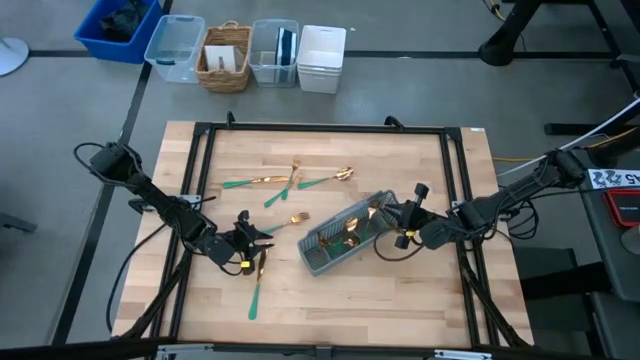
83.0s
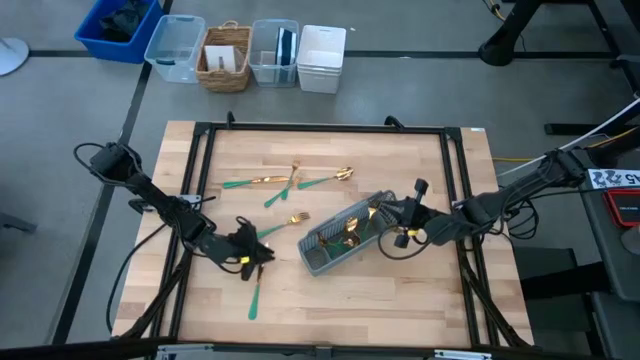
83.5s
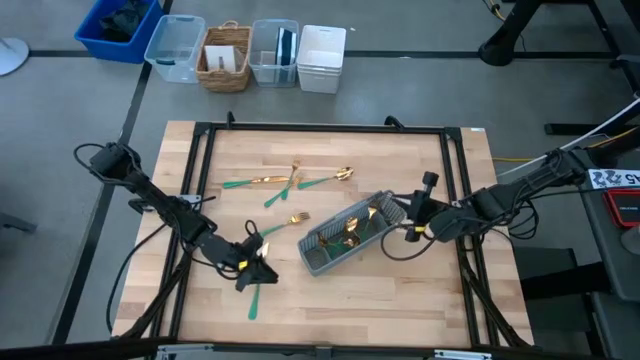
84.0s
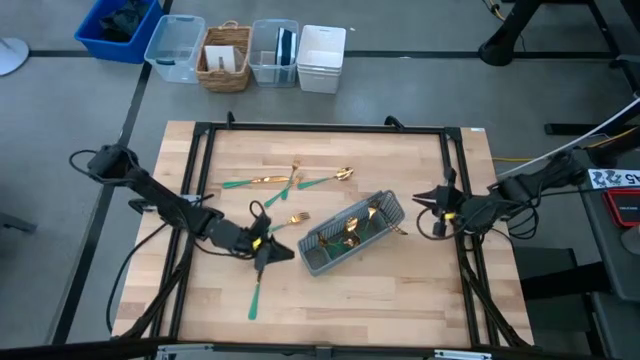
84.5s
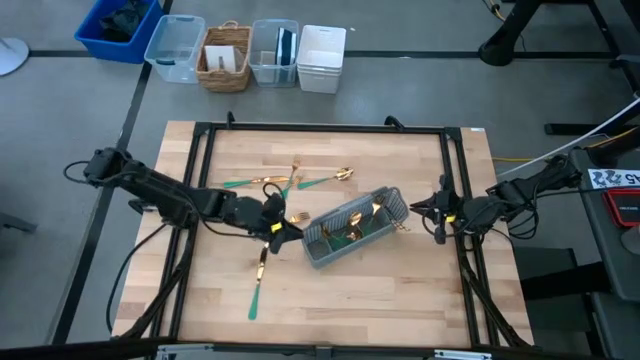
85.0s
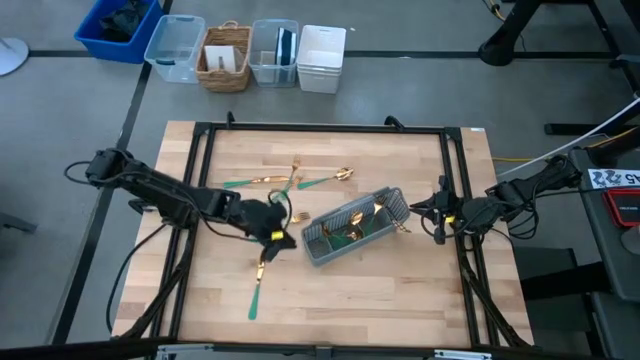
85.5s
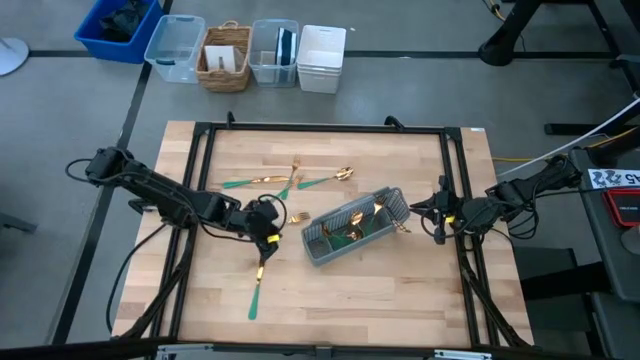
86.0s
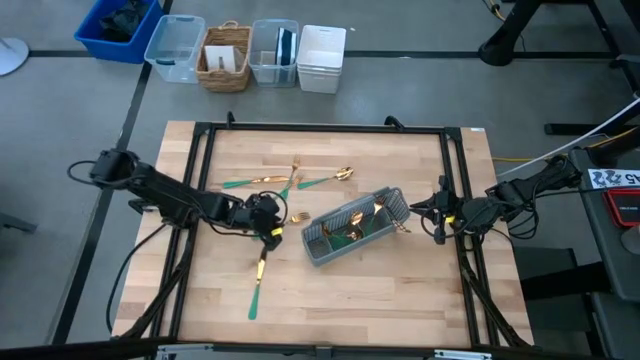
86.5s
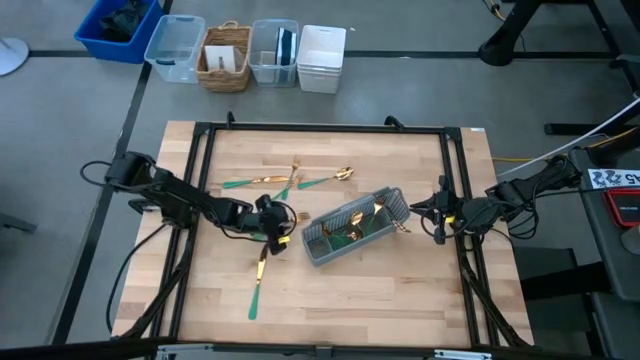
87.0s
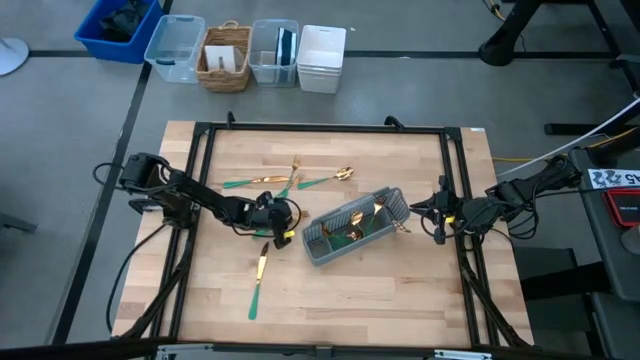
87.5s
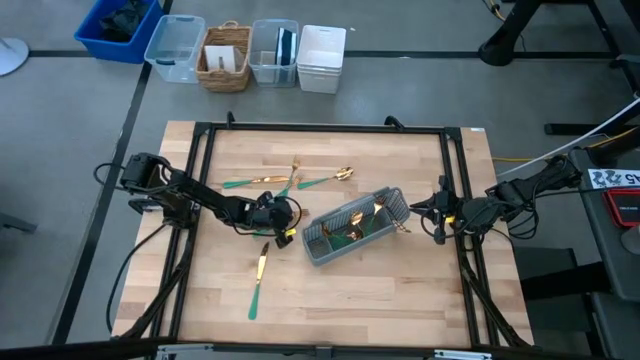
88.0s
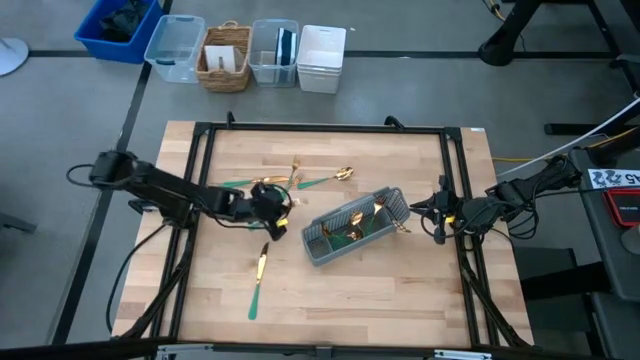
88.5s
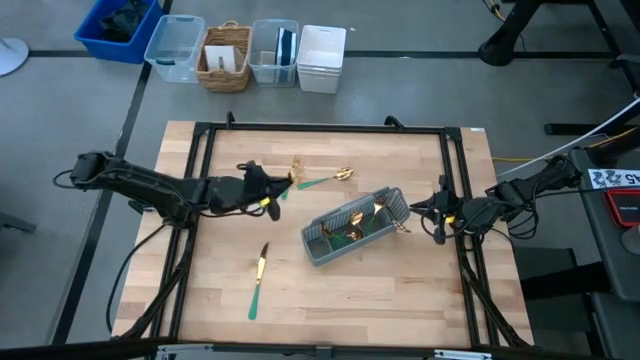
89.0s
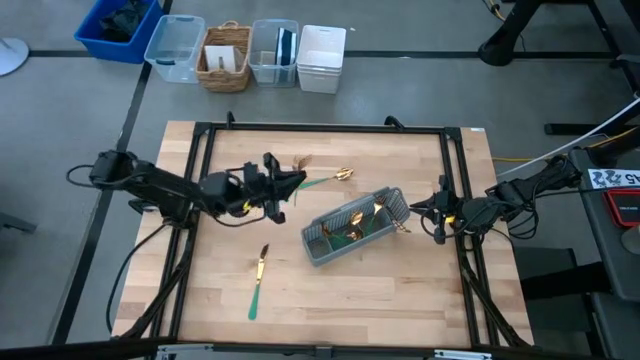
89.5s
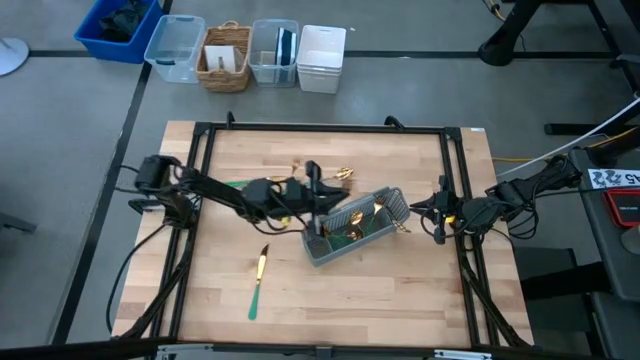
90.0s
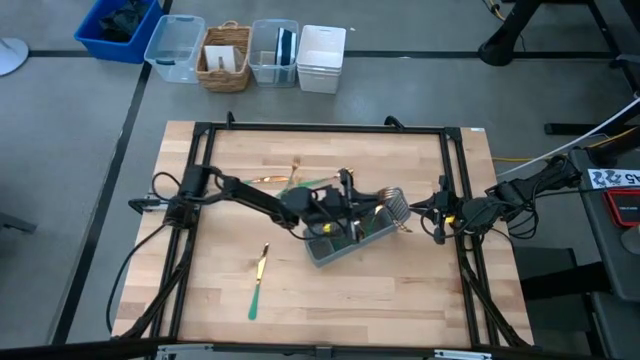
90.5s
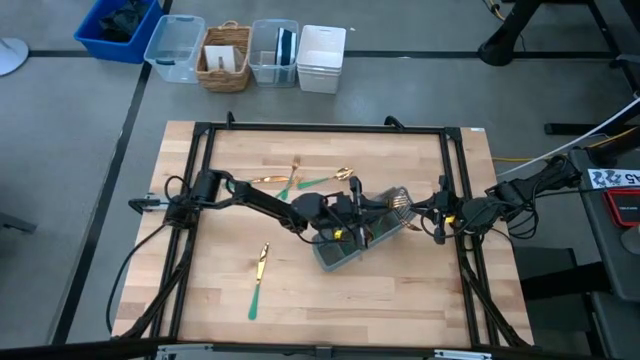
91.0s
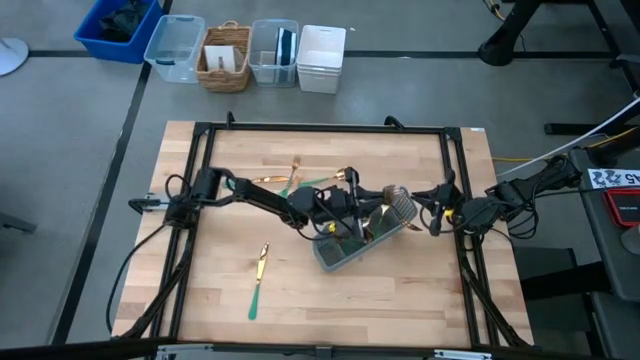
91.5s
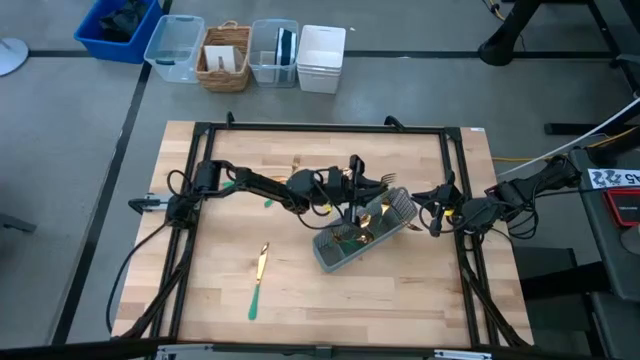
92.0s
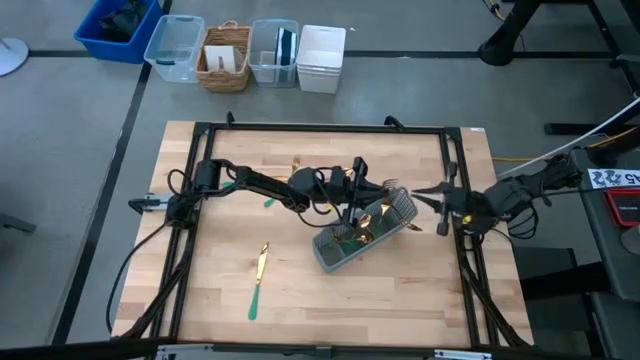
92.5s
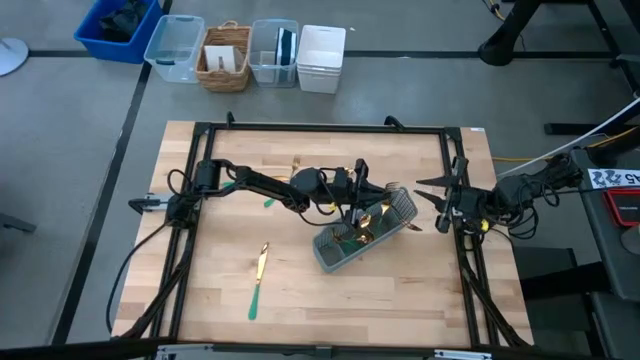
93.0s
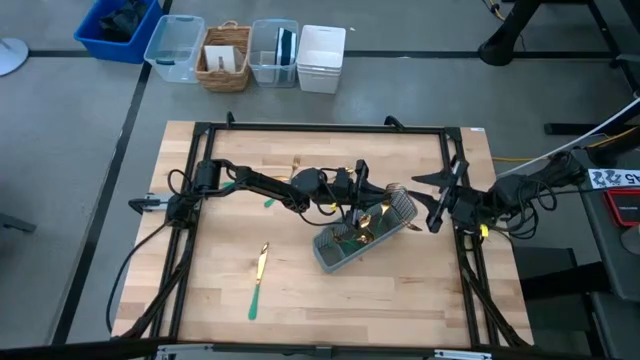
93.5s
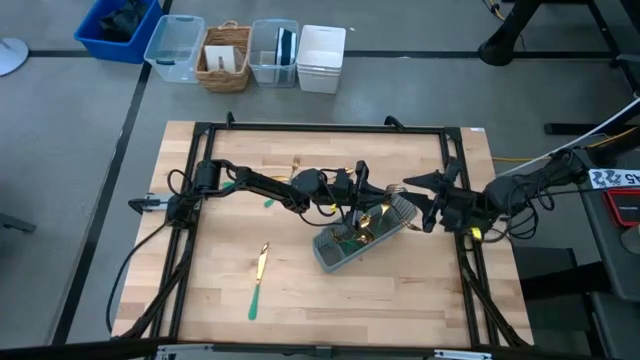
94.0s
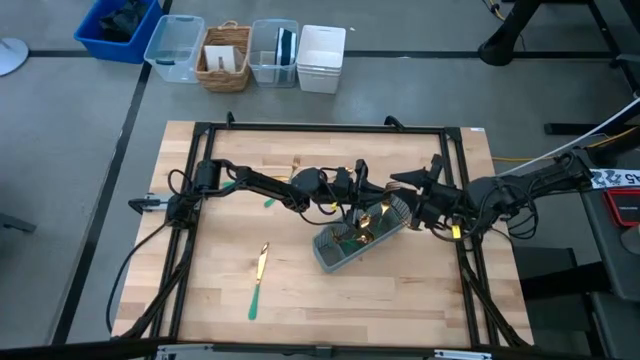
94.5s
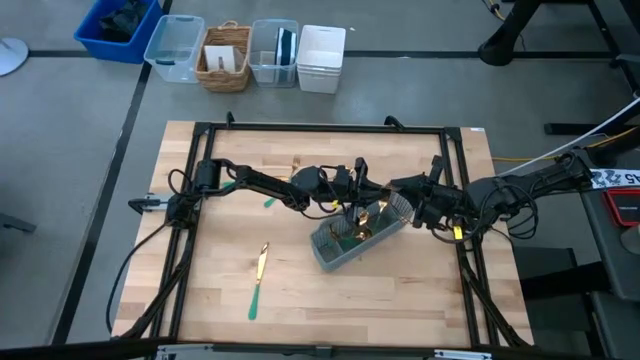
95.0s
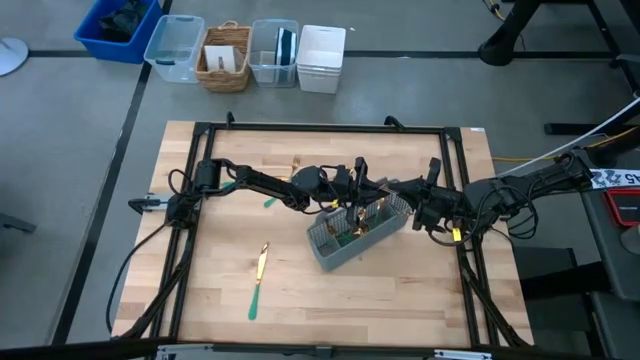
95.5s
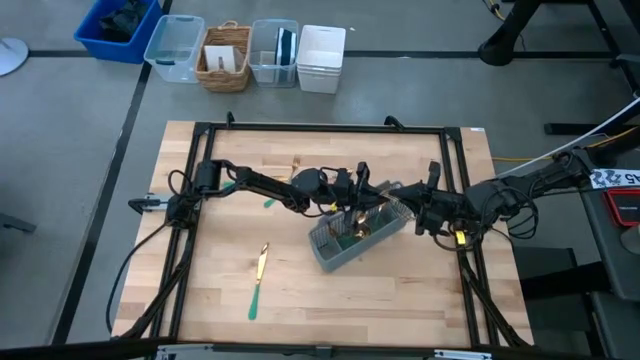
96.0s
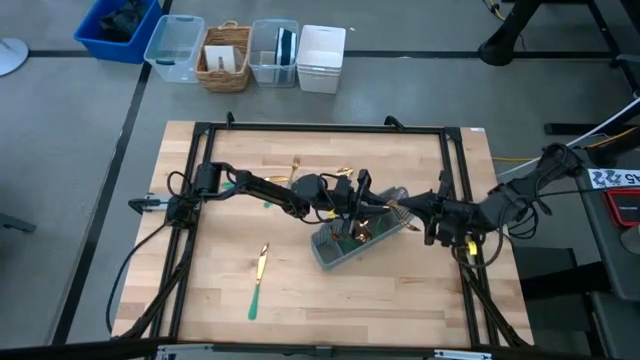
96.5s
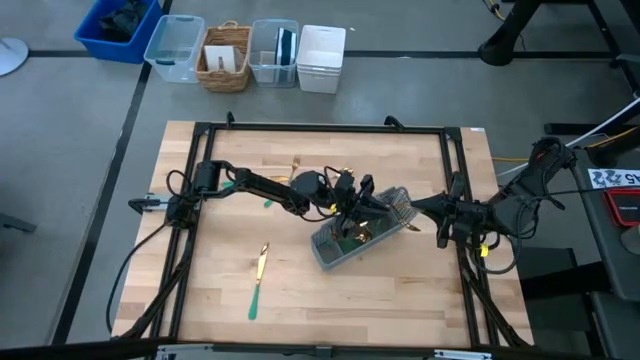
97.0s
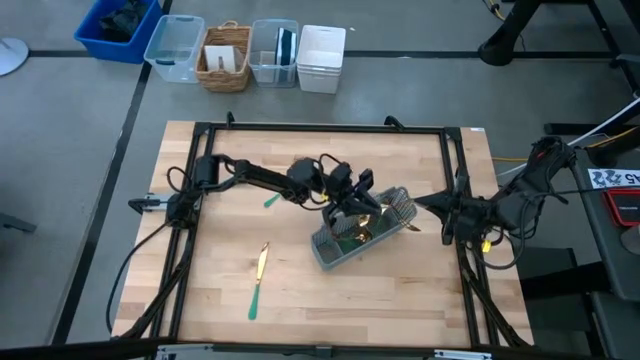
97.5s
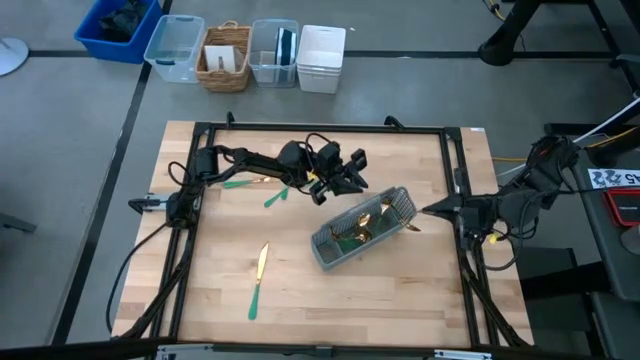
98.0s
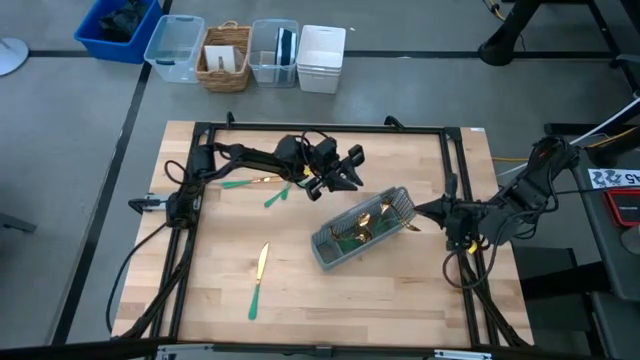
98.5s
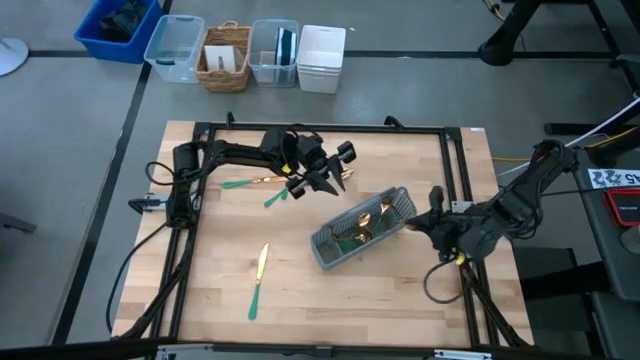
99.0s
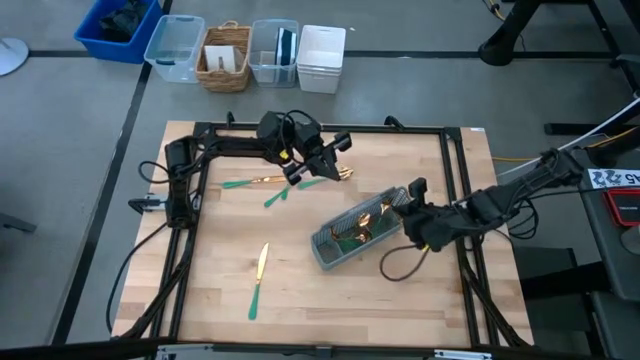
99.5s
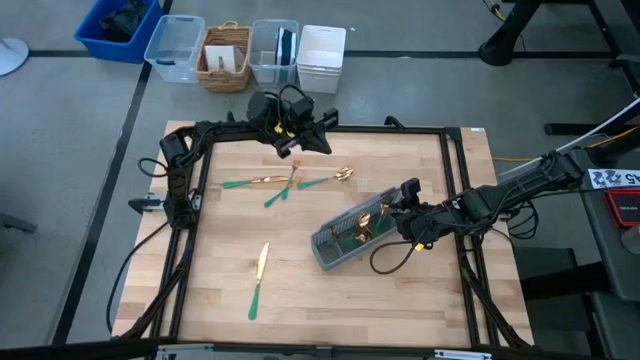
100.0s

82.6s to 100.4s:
Task: Sort silverware
Put the gold fork into the gray silverware organizer

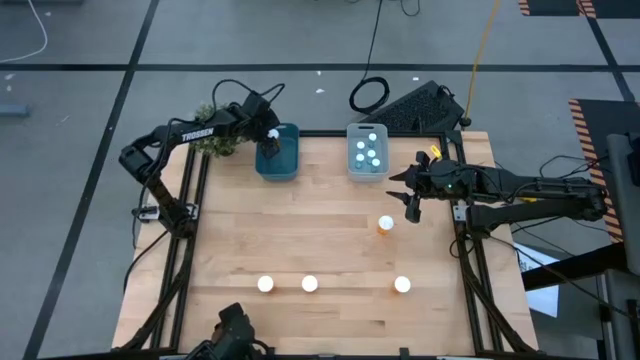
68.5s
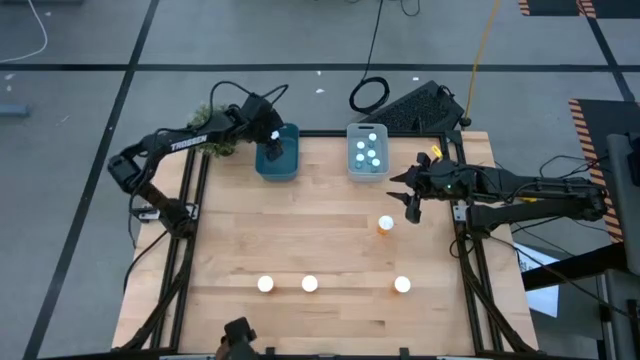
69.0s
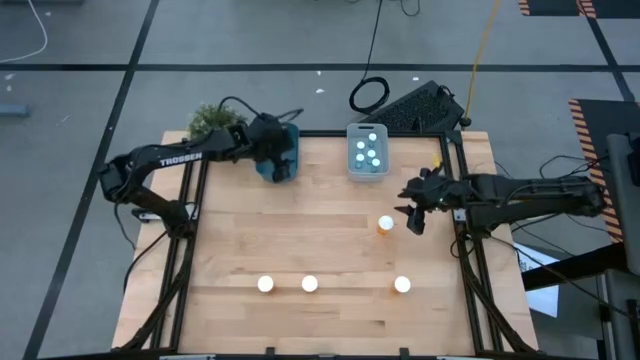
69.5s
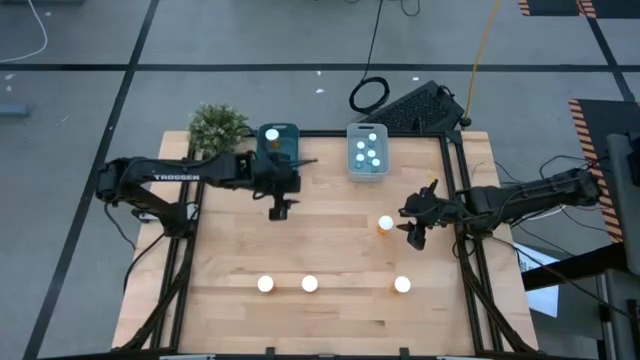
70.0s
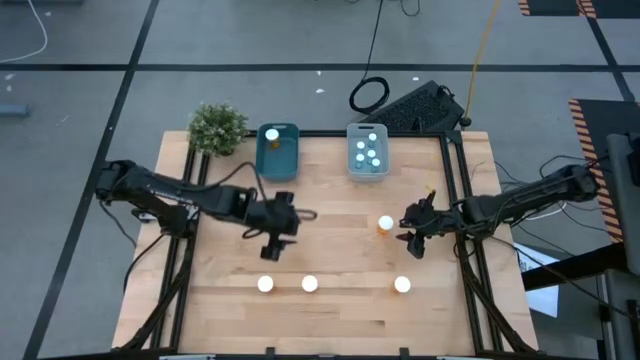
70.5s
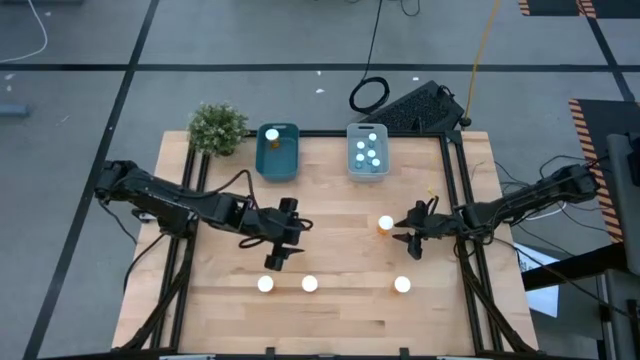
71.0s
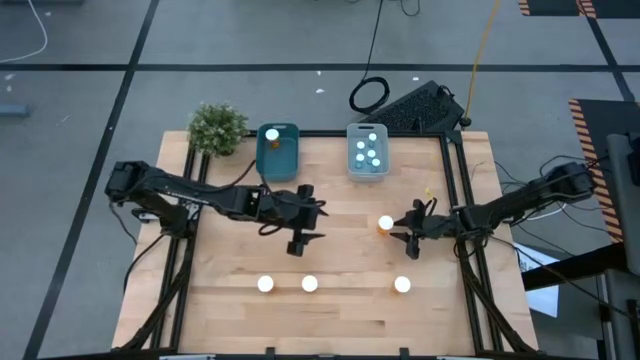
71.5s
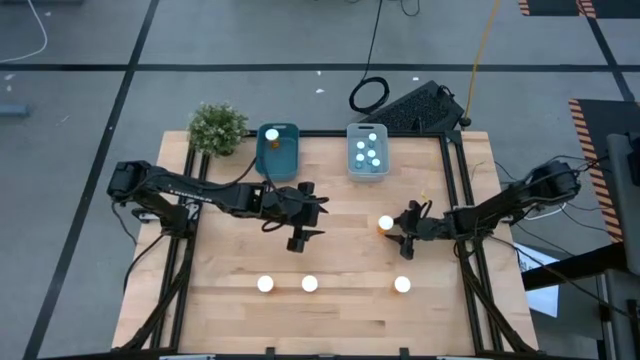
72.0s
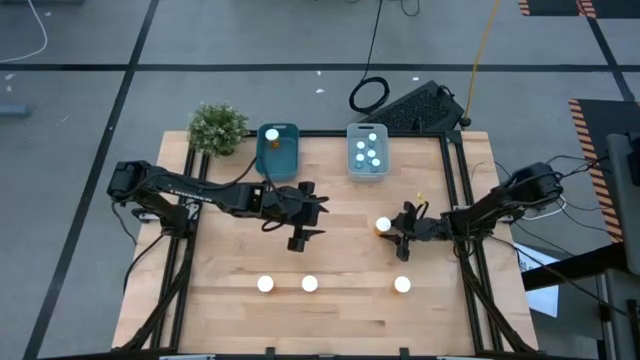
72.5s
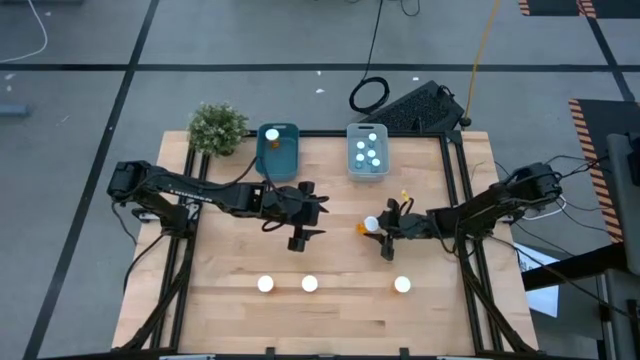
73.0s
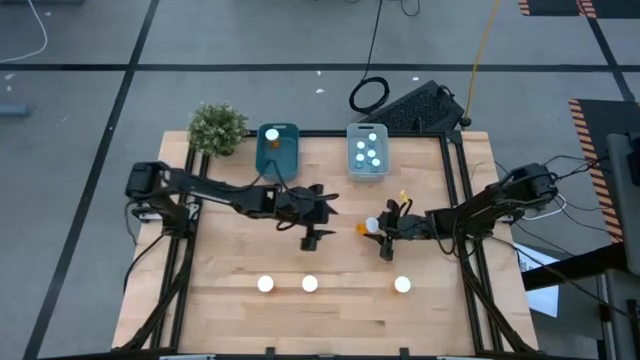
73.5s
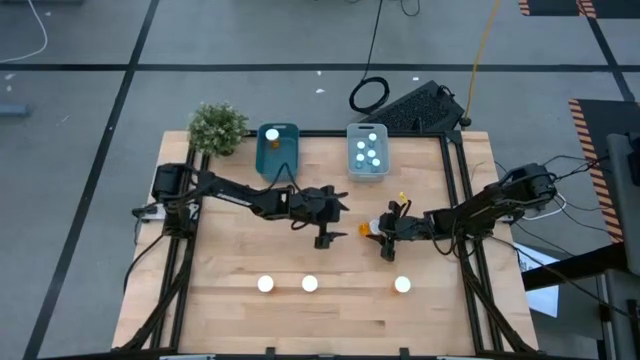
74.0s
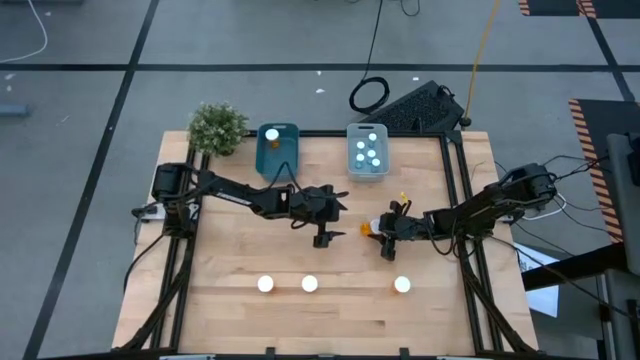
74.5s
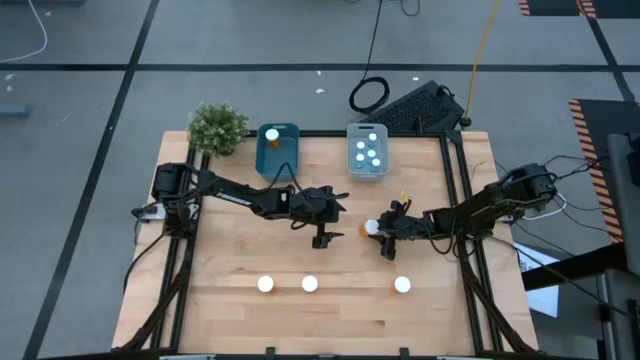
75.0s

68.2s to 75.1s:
Task: Pick and place medicine bottles into bin by pill shape (circle, oval)
Put the orange pill bottle into the green bin
